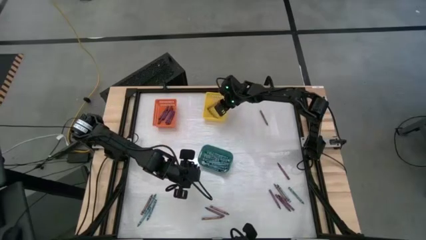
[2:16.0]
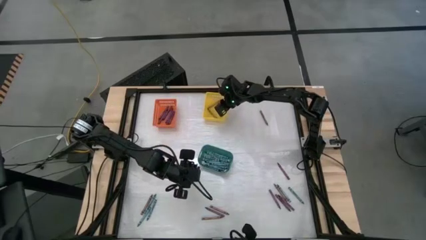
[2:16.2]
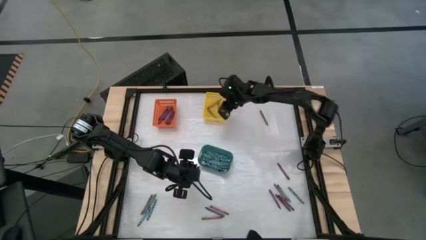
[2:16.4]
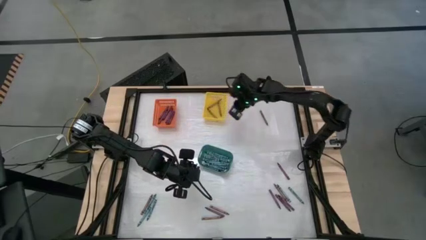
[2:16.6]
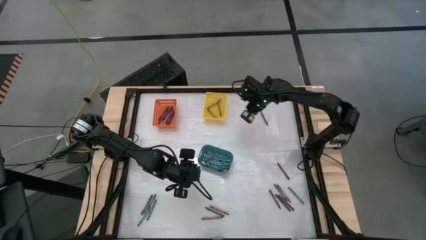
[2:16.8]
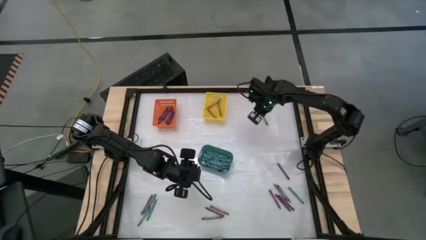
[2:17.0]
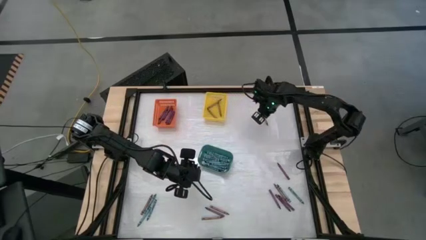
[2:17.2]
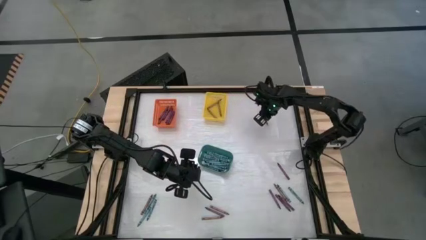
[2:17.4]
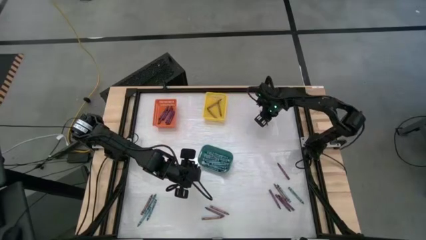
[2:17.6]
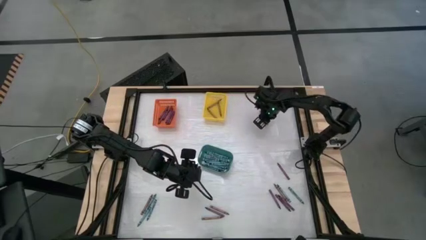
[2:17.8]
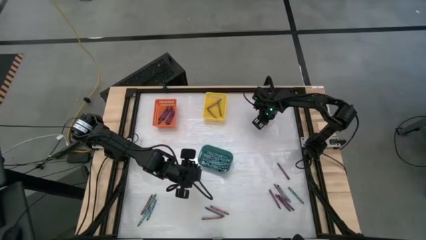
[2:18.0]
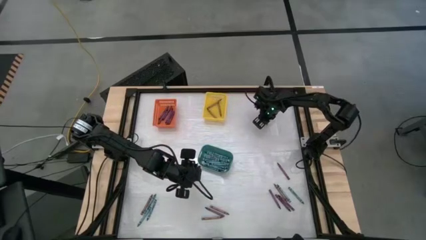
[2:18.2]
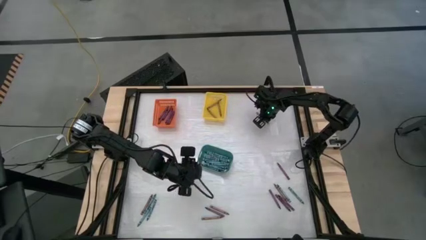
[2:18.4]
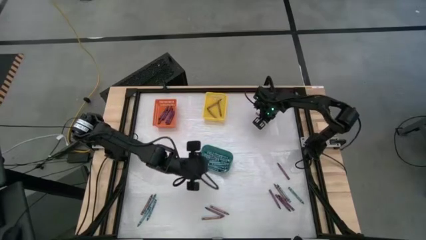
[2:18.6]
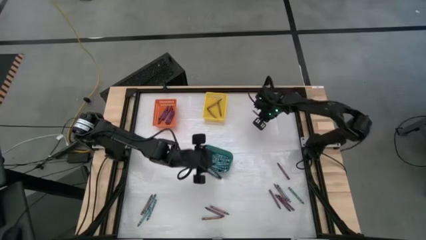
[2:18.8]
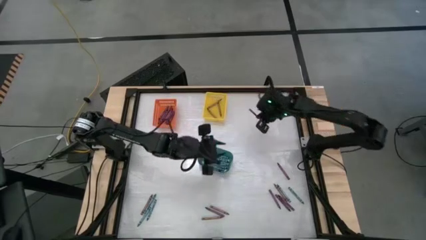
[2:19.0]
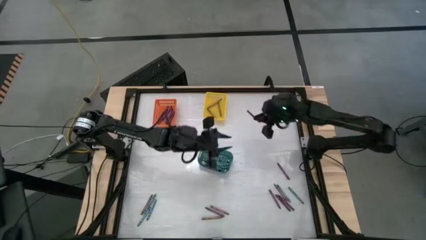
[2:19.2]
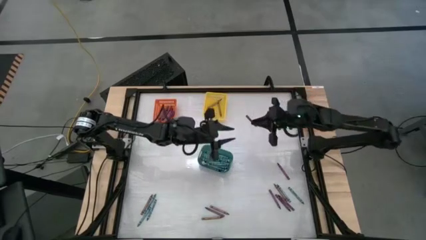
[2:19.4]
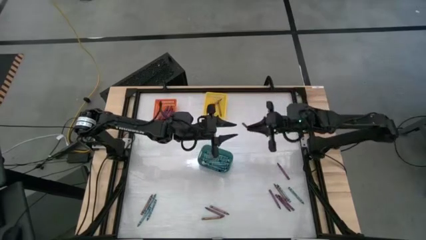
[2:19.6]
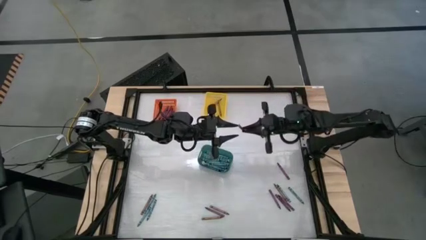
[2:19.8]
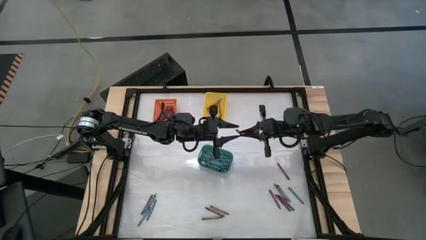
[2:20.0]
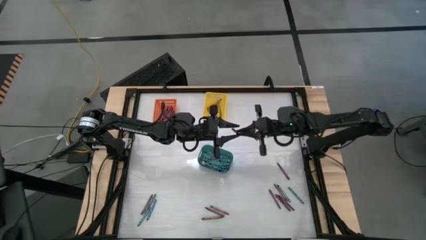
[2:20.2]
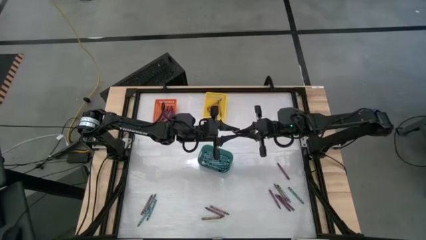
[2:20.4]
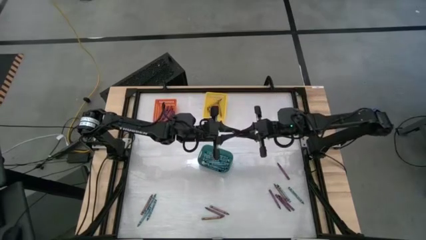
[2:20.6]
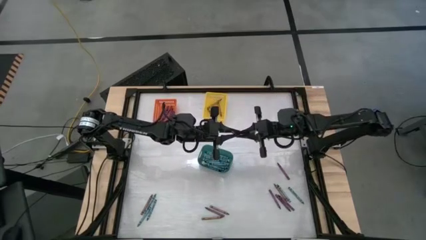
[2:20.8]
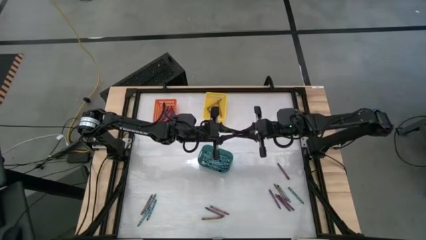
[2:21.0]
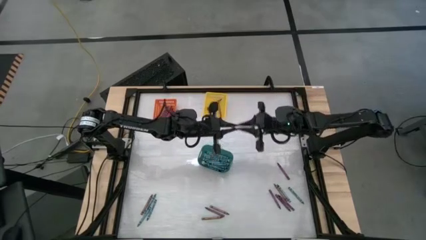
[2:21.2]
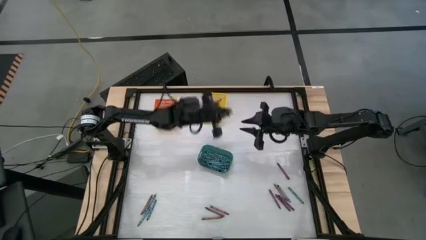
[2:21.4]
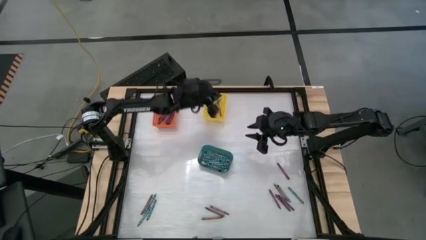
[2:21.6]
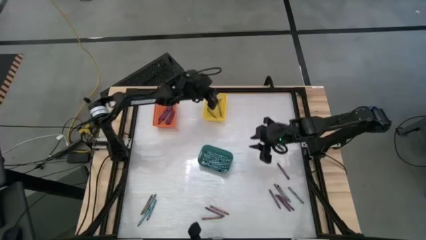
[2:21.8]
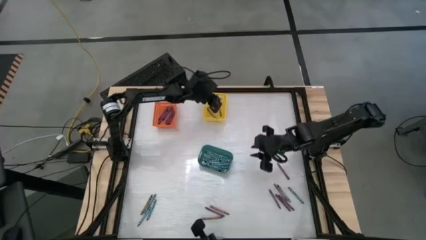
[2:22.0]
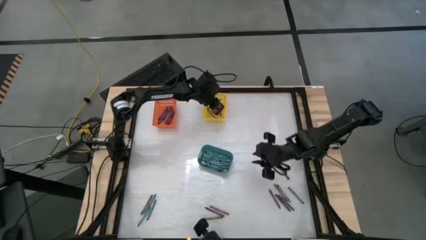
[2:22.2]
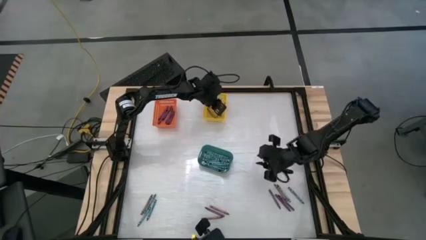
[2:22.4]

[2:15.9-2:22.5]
Task: Sort crayons
Put the brown crayon into the yellow bin

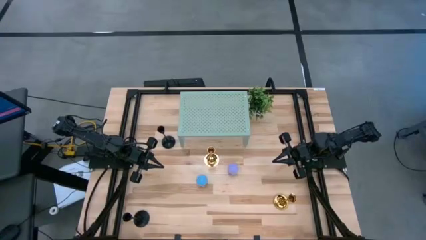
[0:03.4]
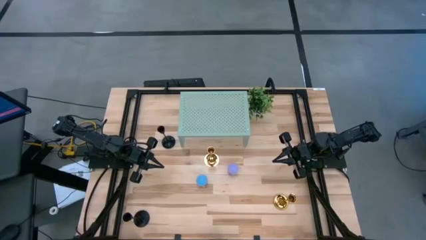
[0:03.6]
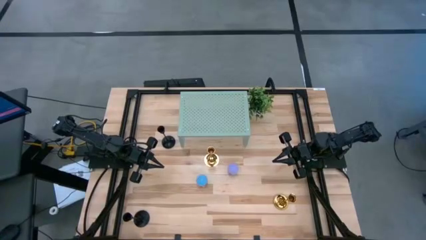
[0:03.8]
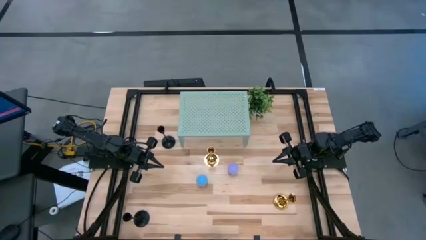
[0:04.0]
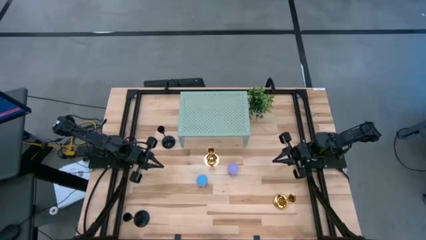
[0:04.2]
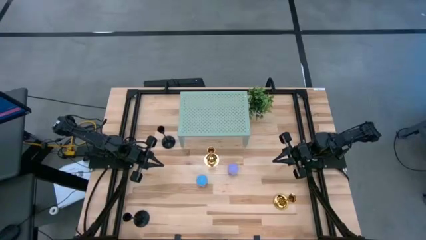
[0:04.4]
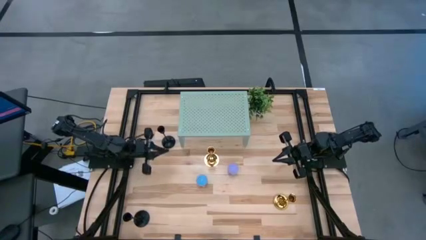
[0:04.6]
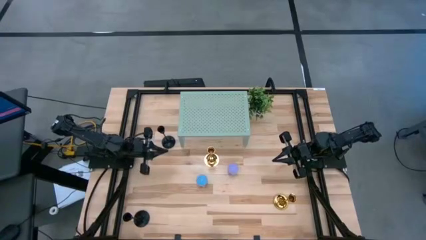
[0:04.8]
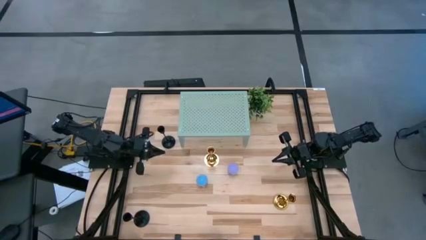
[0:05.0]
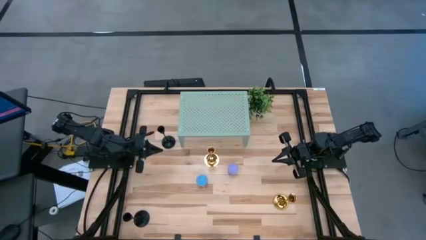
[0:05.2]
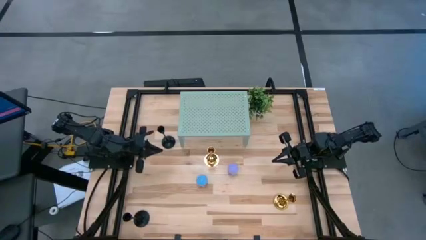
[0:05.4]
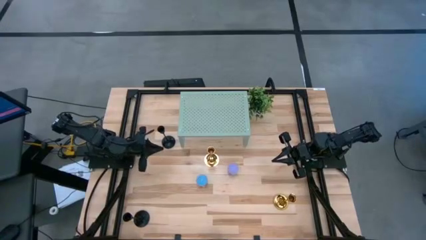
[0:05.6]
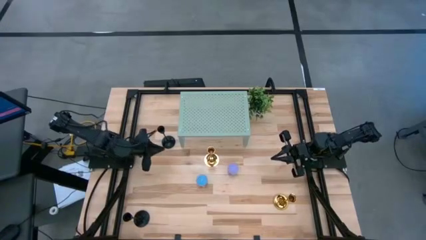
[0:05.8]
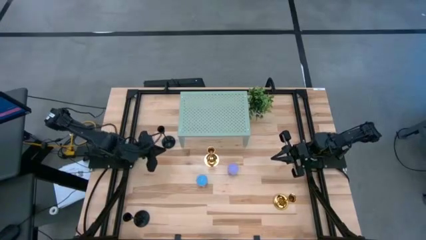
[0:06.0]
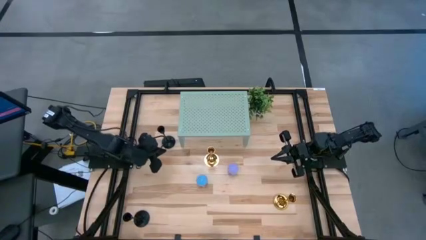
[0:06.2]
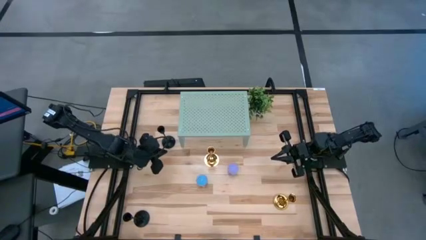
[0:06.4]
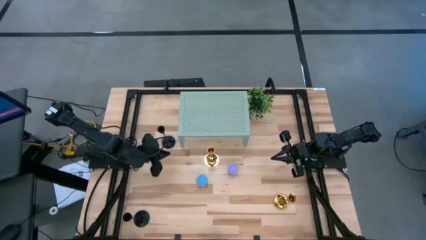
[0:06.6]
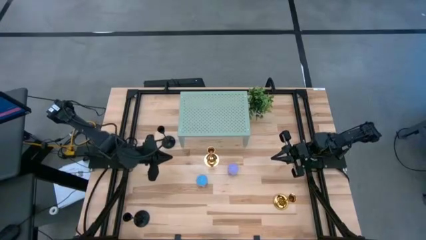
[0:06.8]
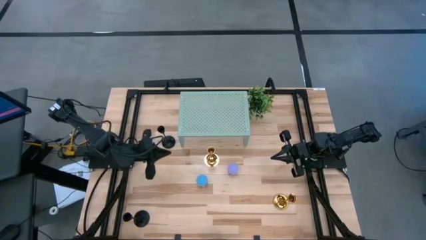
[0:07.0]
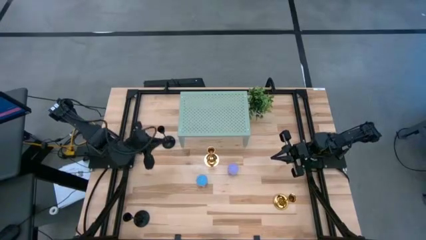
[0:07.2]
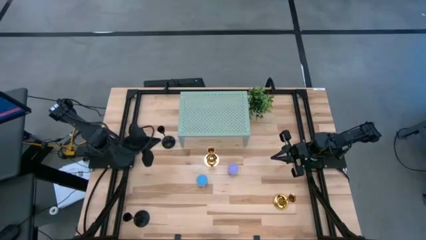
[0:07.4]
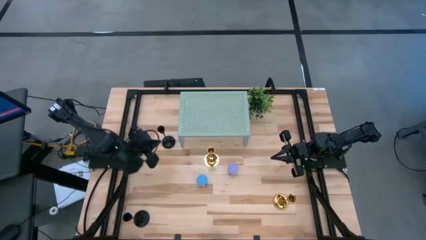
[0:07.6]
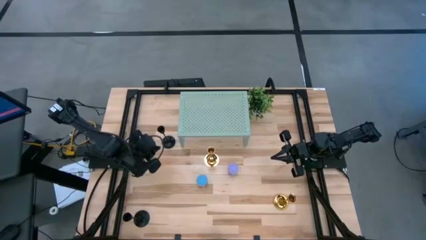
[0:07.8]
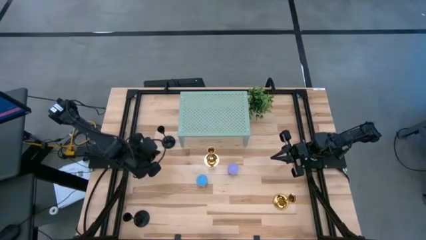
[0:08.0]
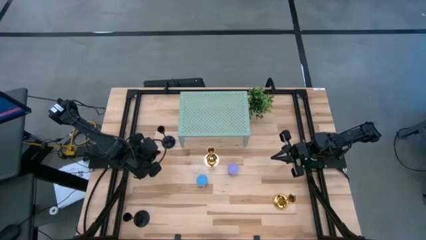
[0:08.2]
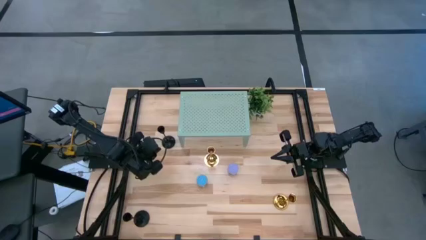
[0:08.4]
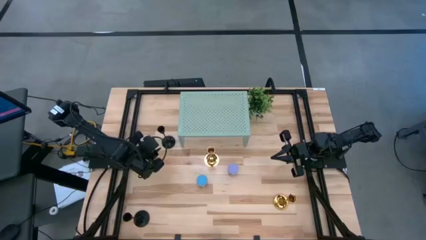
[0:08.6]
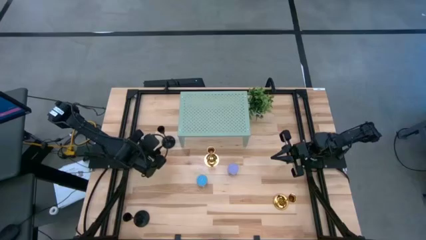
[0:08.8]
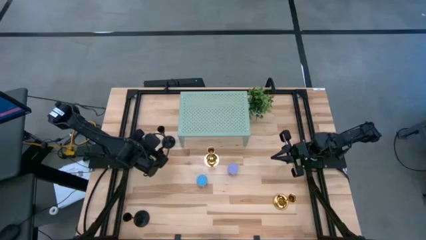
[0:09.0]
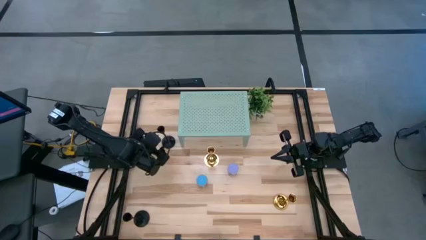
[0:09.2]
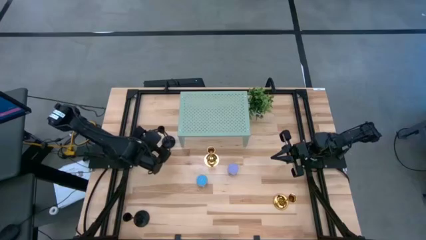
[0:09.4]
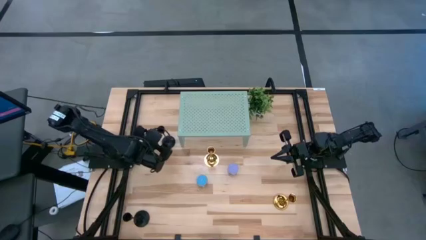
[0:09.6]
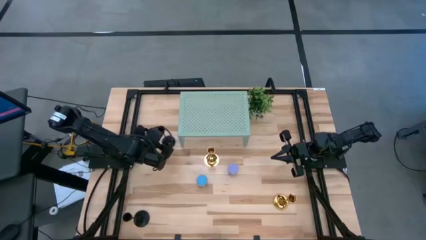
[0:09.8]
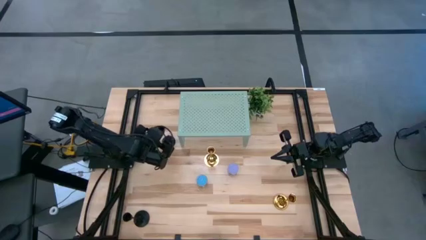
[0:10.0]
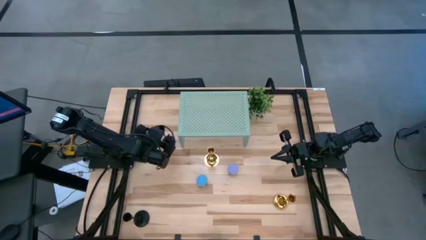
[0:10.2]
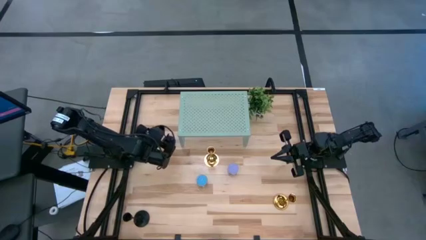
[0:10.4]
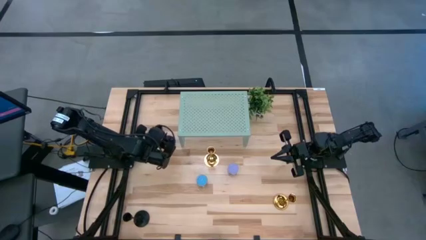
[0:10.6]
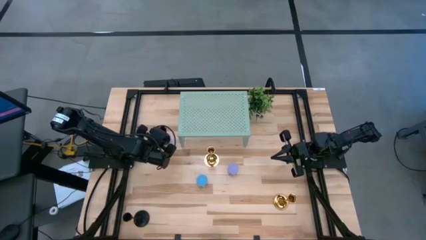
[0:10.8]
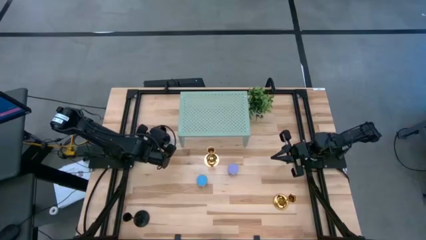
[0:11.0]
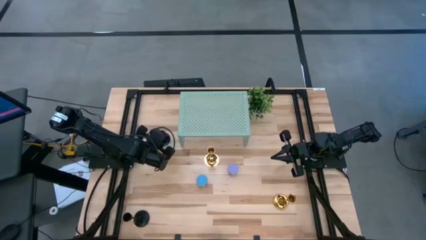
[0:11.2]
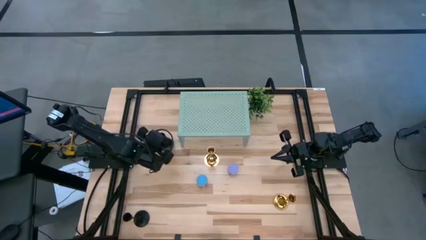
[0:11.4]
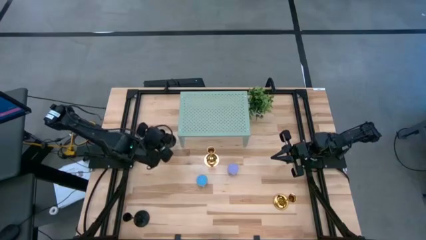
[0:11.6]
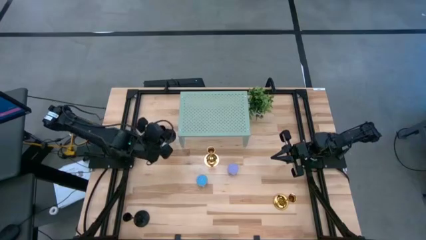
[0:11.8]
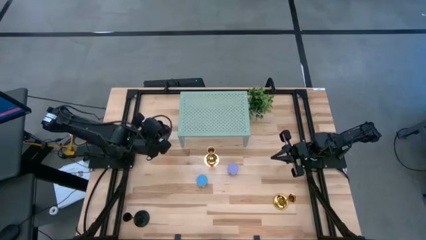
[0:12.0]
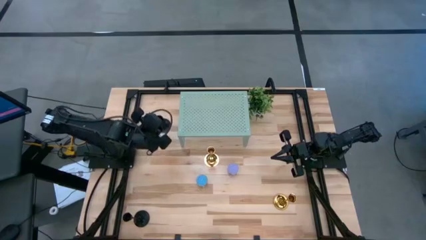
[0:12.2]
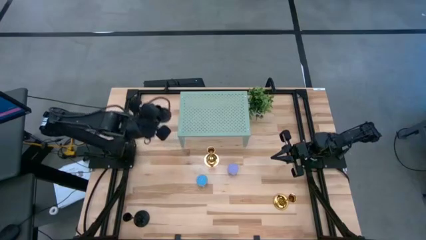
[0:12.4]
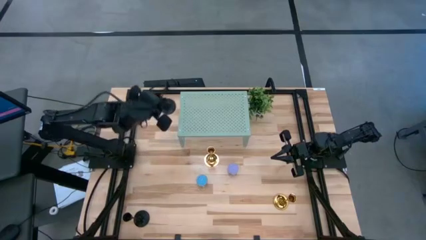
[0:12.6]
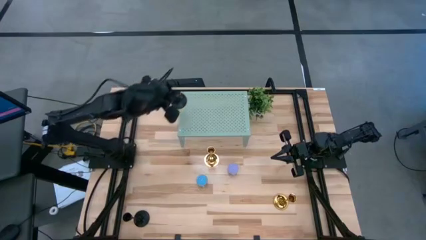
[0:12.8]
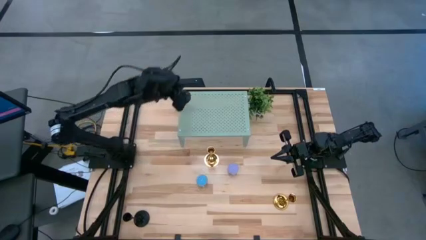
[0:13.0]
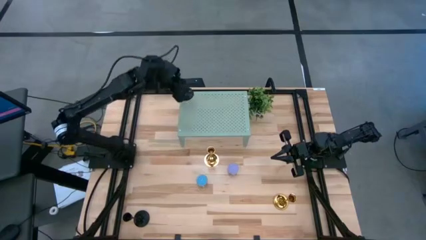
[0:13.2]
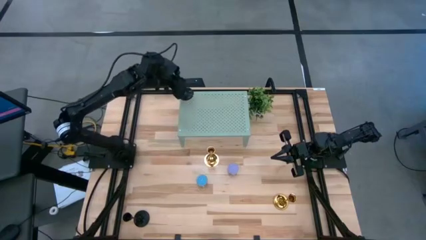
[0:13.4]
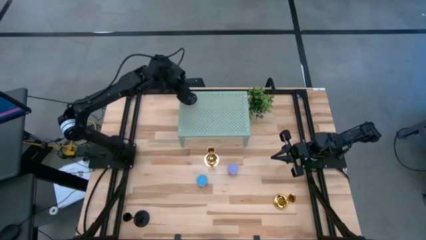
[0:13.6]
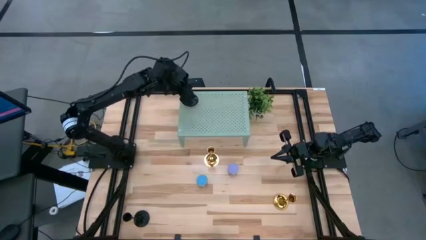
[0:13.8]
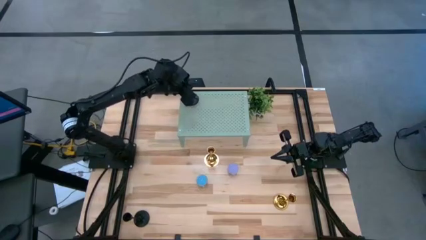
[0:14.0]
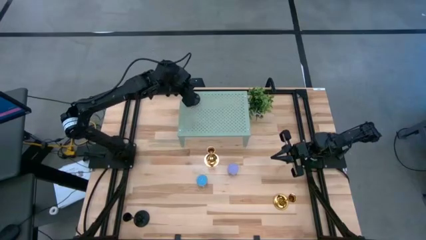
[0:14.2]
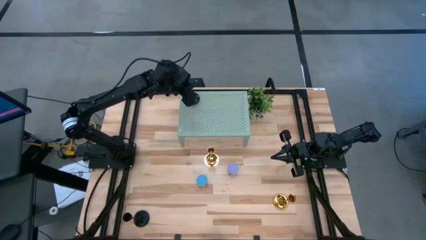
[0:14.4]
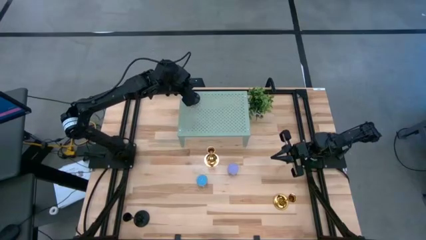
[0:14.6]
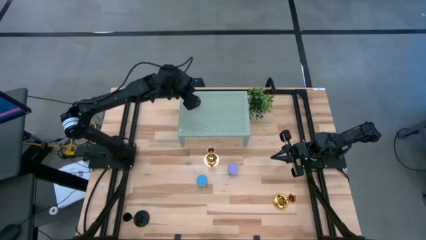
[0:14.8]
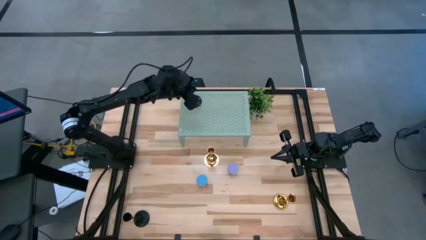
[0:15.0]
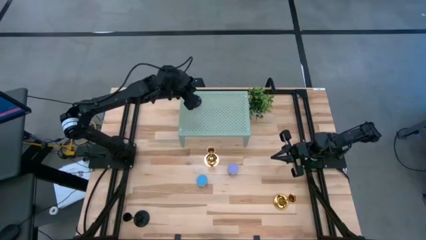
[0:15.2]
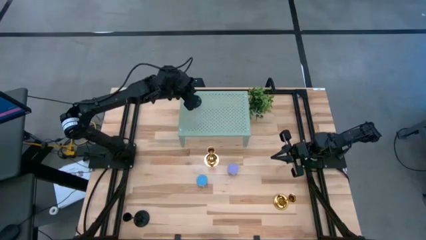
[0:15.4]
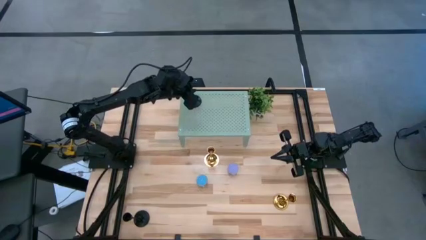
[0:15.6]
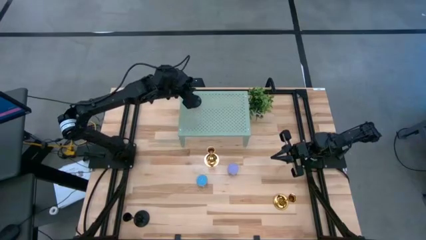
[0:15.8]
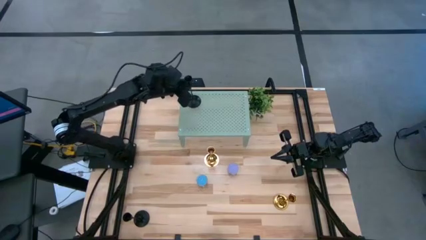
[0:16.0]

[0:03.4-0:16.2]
Task: Pick & Place candle stick holders
Put the top black candle holder on the shelf
